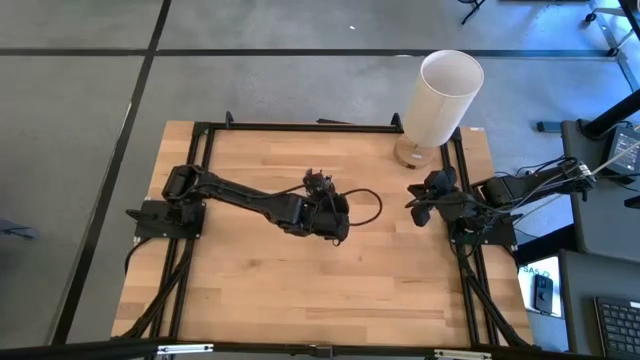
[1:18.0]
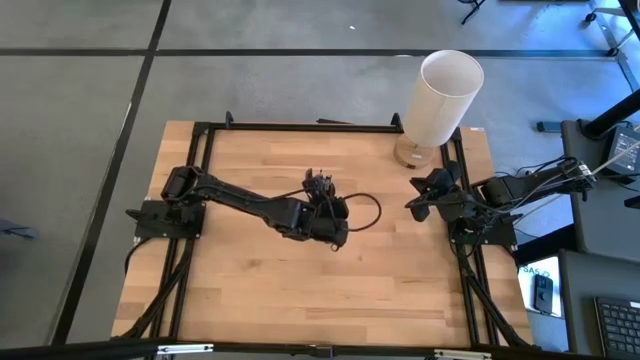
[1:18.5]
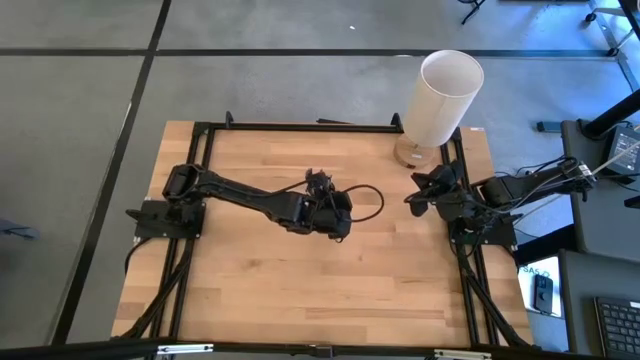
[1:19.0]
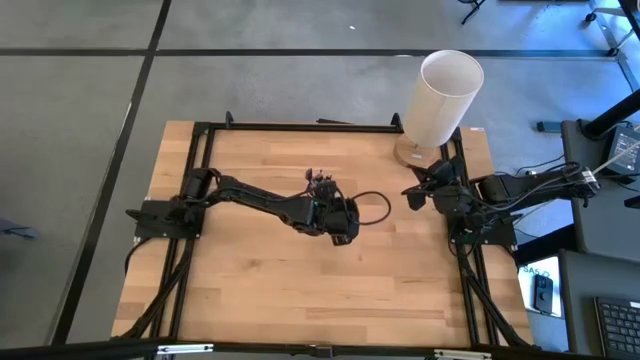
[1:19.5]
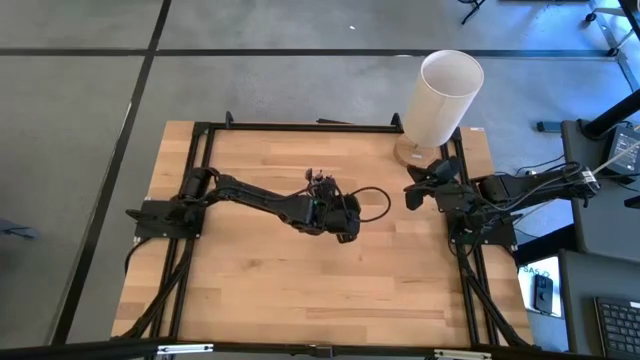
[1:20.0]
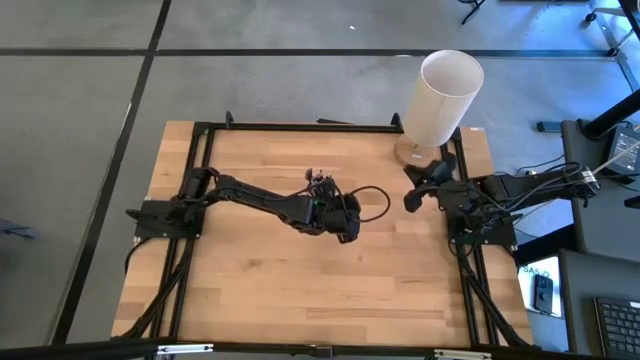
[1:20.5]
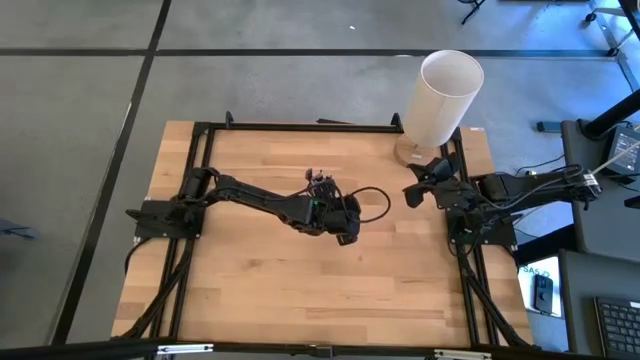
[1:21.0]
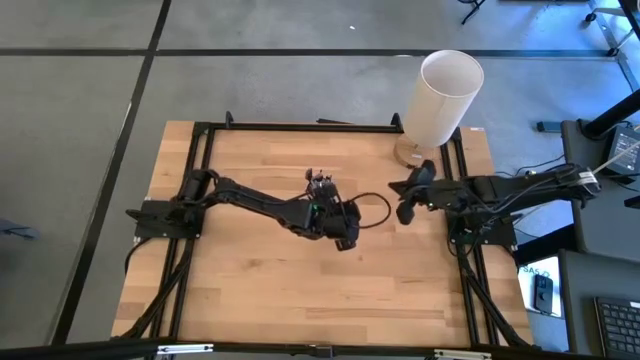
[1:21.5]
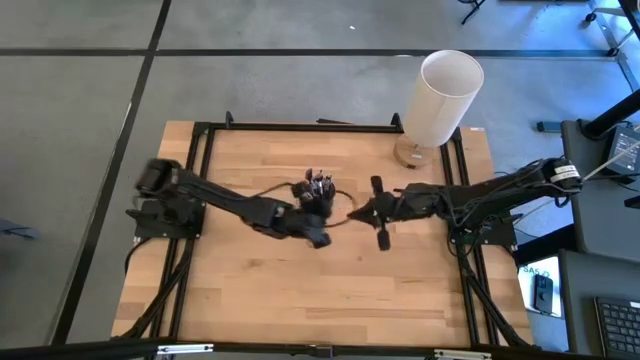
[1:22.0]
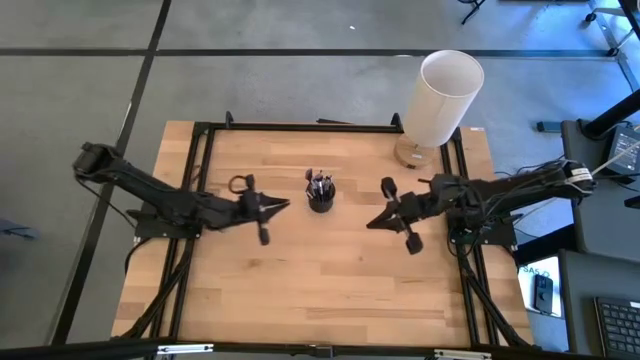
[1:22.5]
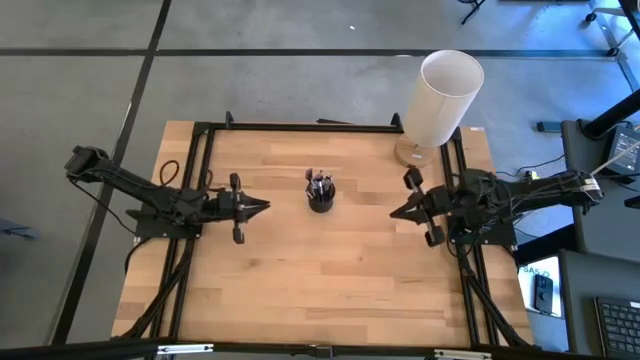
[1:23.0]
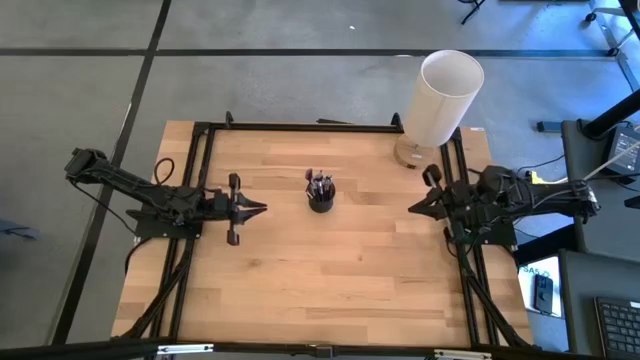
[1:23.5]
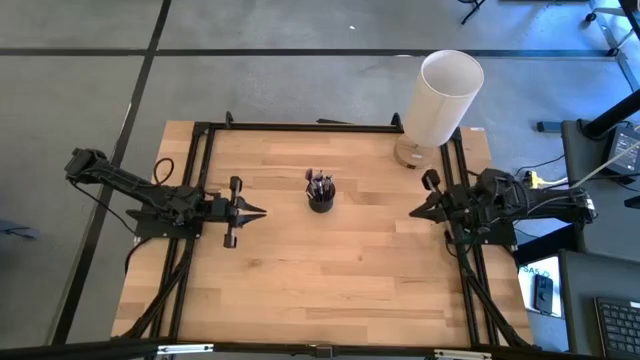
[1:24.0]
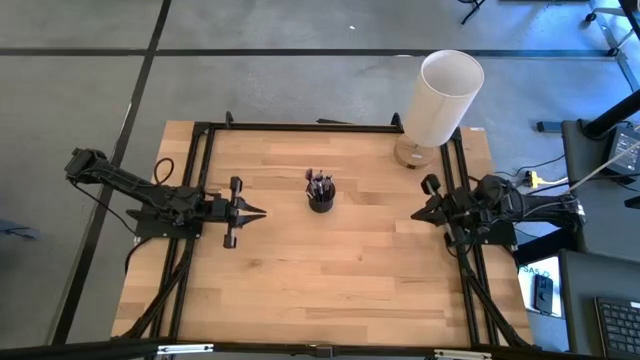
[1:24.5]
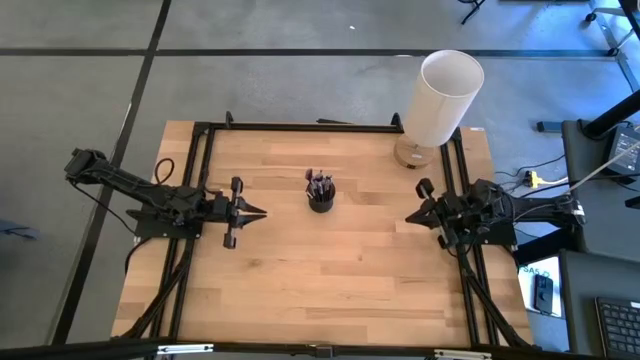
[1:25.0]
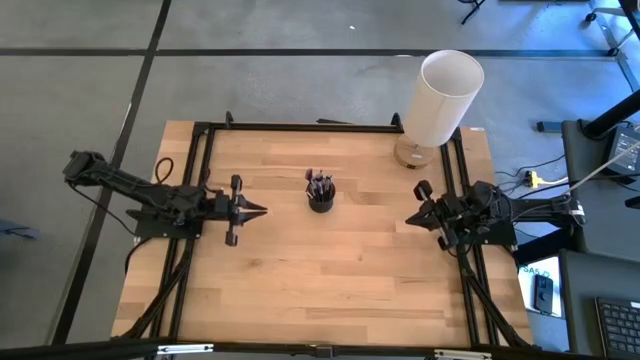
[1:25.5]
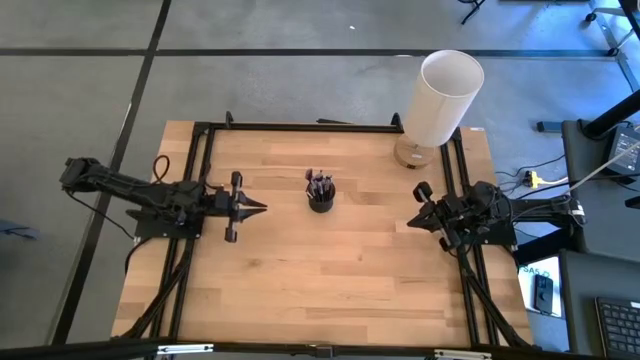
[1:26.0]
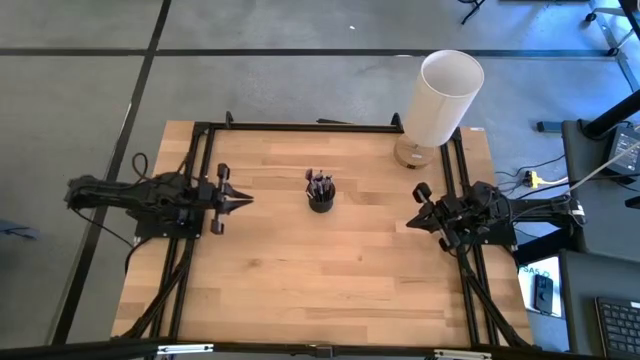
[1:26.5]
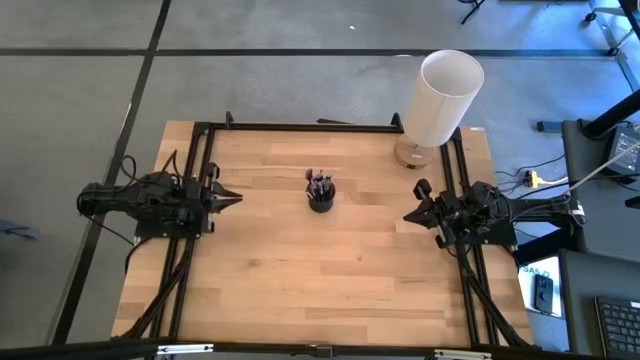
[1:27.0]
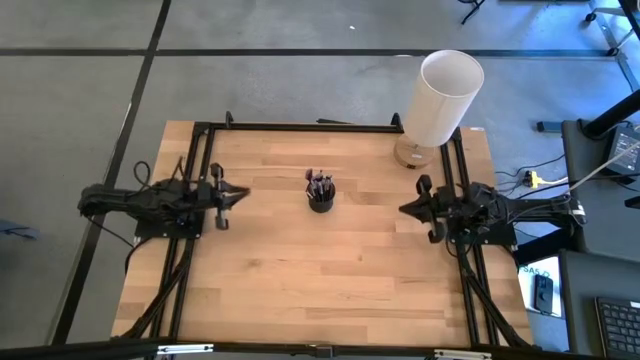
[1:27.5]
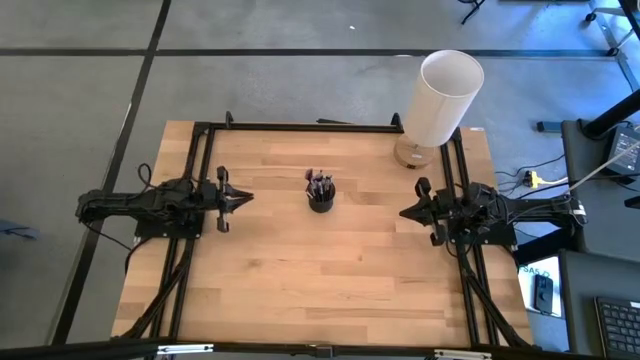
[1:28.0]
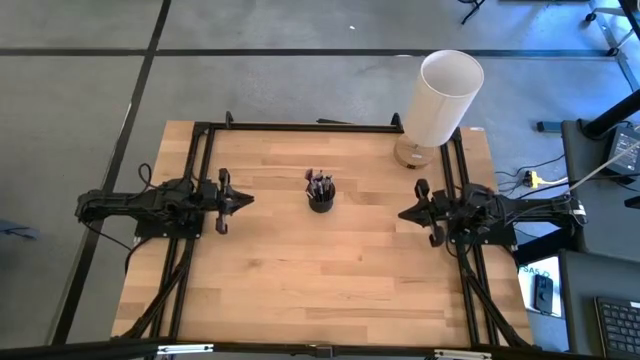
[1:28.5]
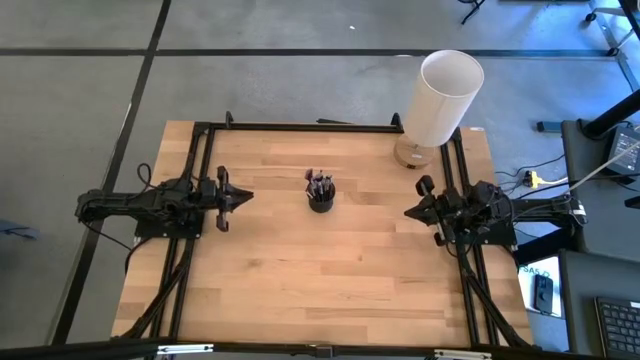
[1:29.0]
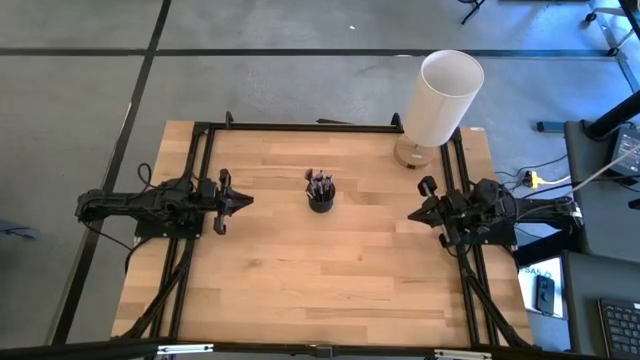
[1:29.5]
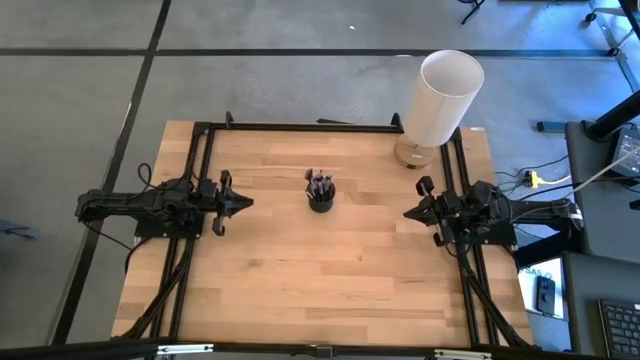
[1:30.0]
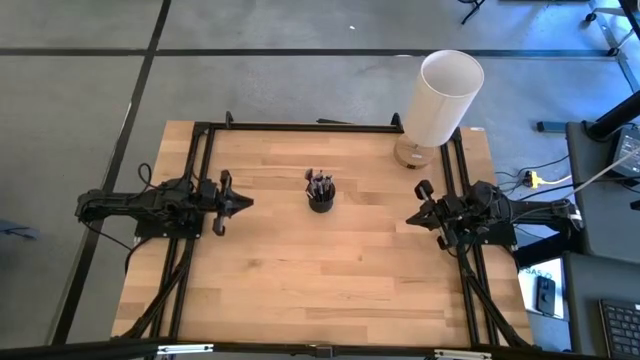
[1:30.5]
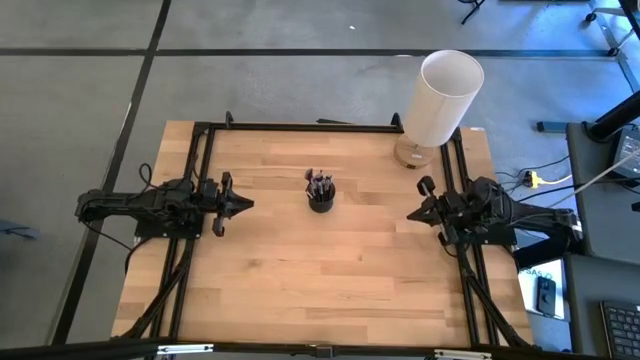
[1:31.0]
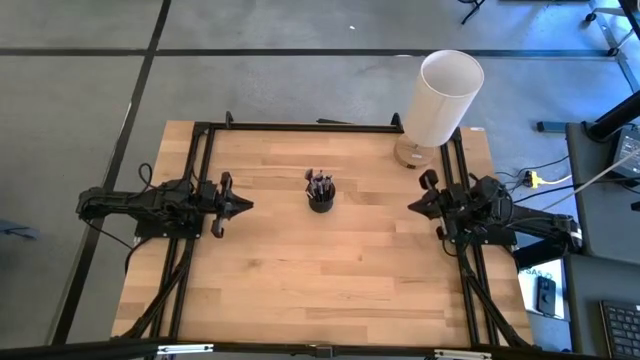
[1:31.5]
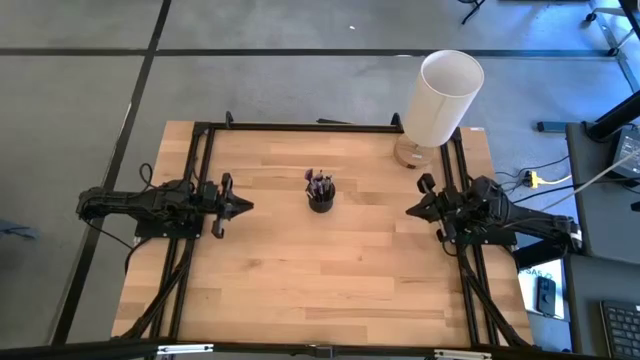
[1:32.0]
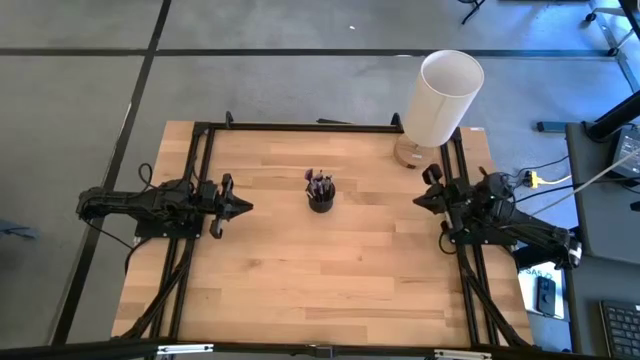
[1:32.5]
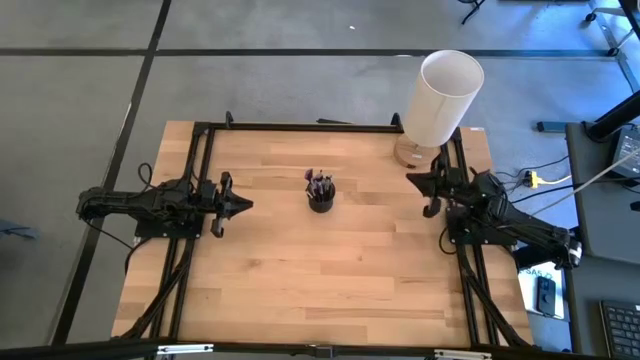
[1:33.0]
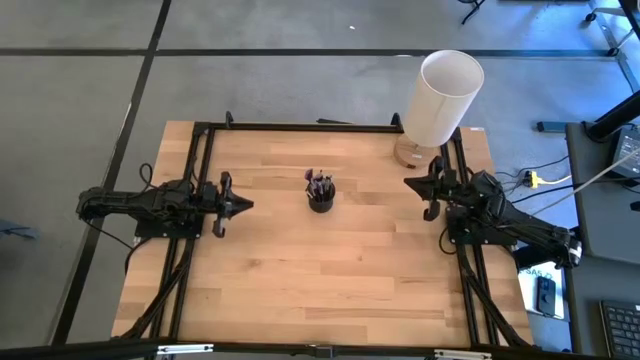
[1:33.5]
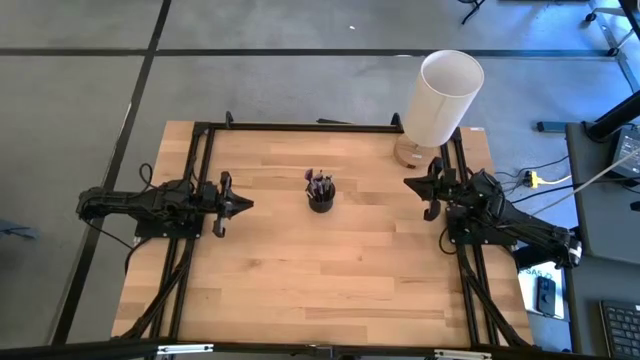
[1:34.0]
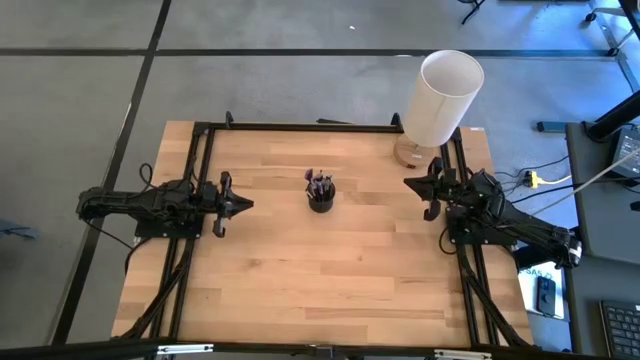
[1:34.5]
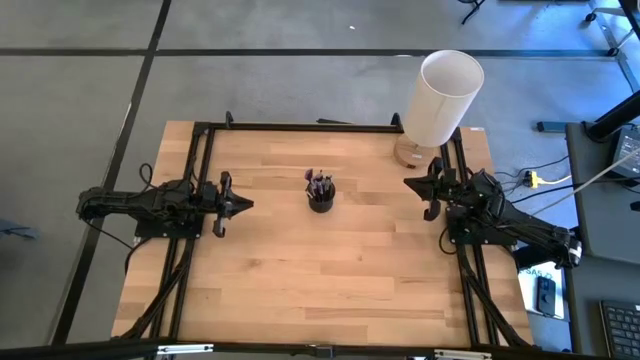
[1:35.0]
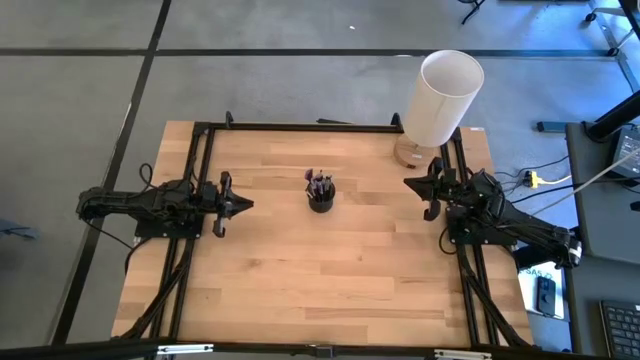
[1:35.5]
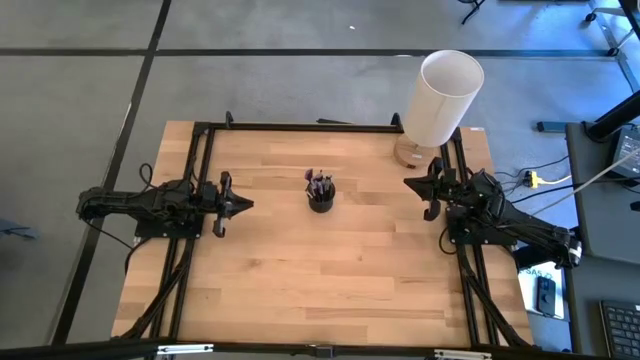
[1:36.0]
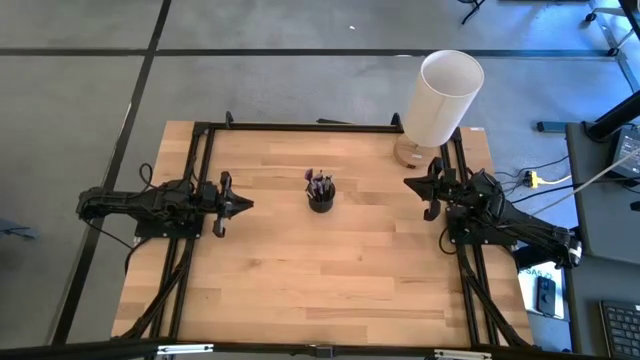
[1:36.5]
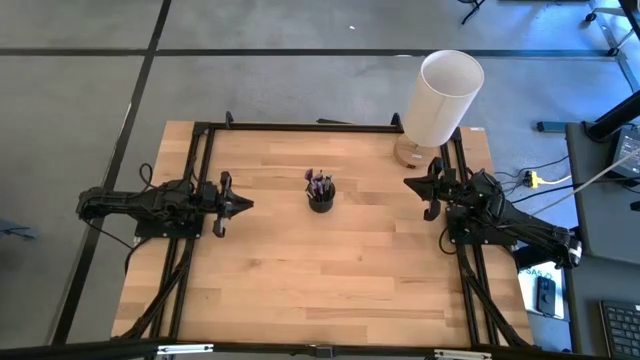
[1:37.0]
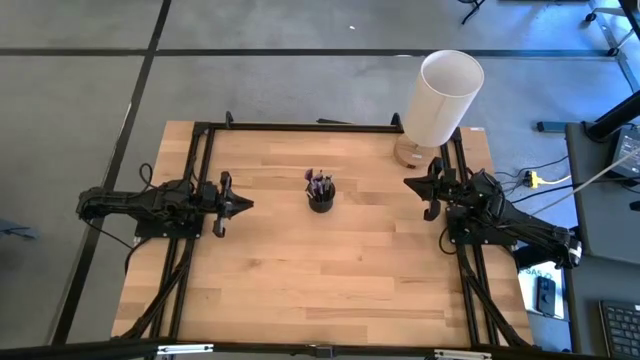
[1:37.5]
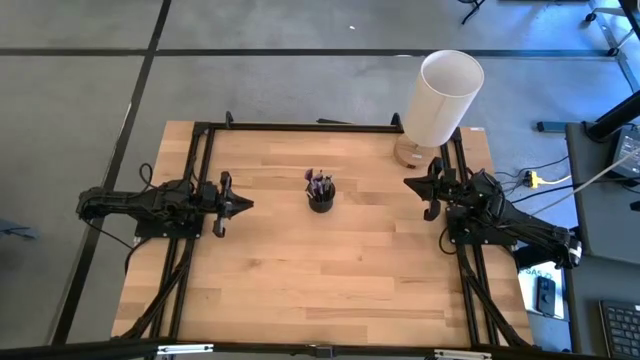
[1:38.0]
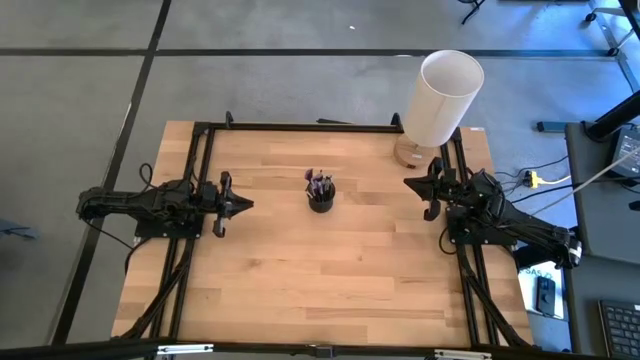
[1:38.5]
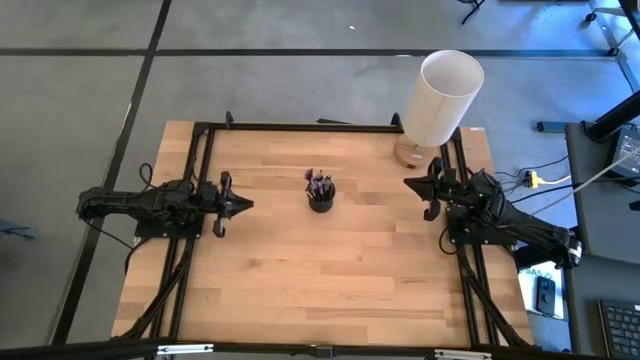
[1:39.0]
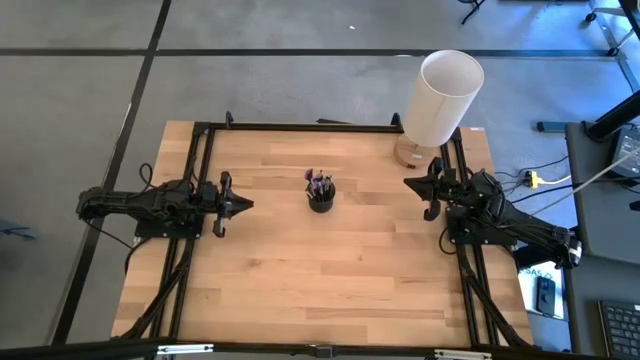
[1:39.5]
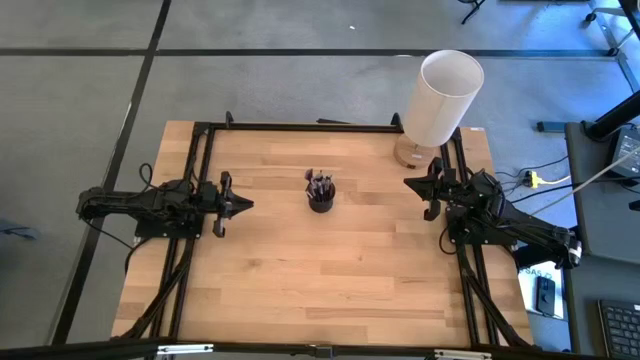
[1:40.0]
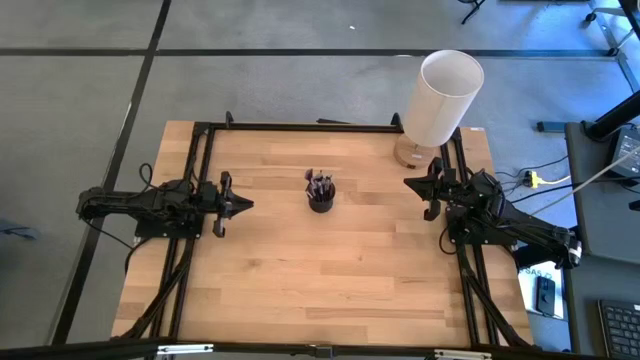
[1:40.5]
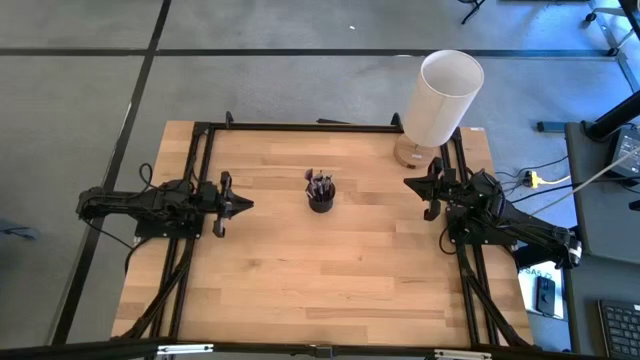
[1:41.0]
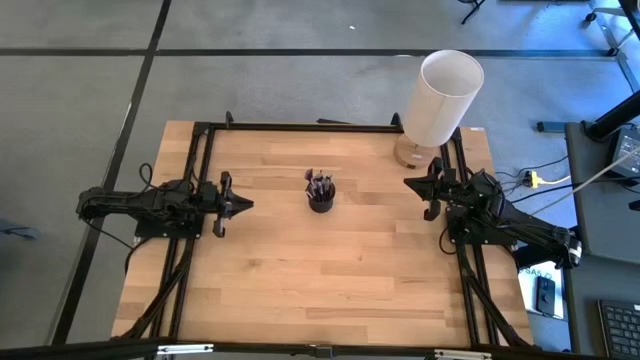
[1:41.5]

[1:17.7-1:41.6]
Task: Sort items
Return to Home Position
